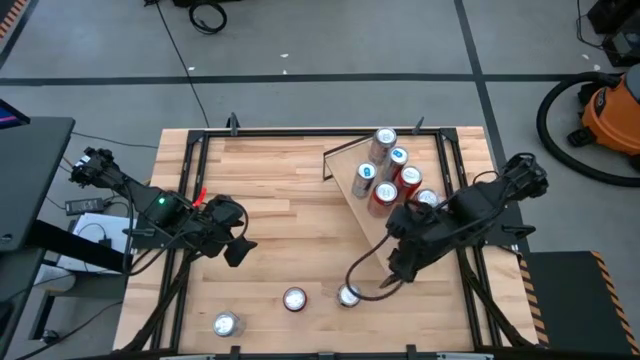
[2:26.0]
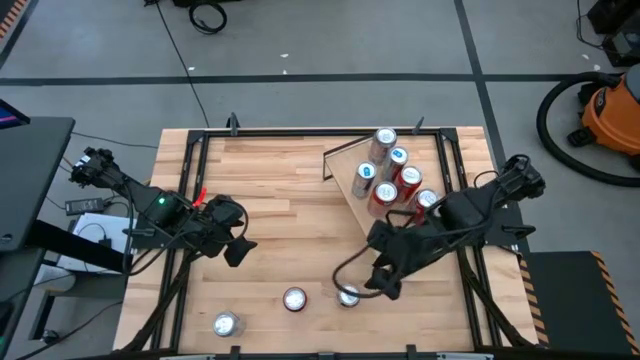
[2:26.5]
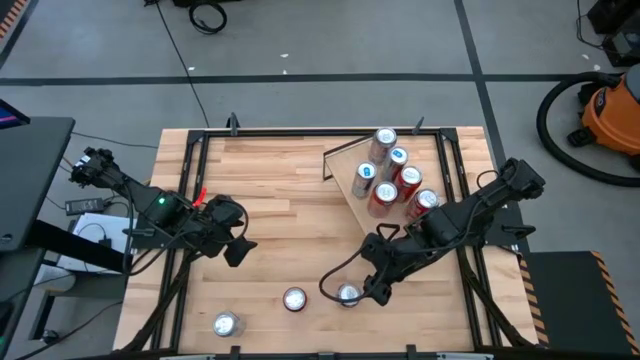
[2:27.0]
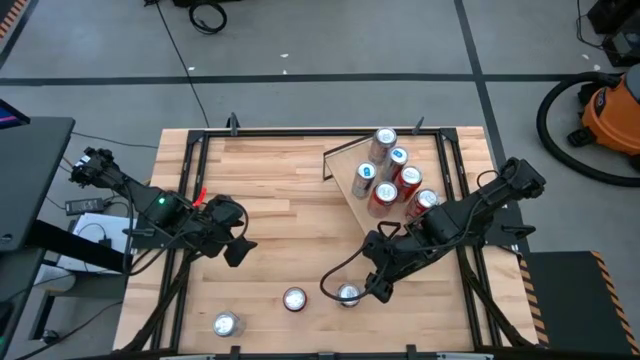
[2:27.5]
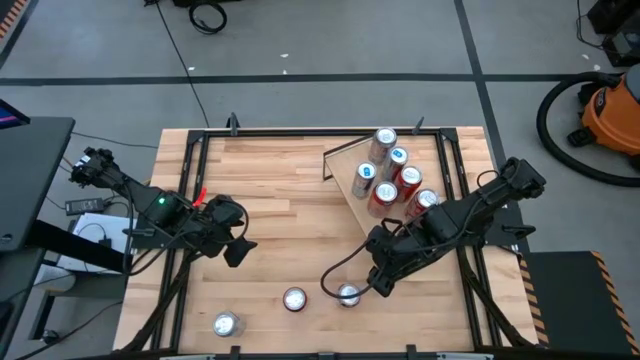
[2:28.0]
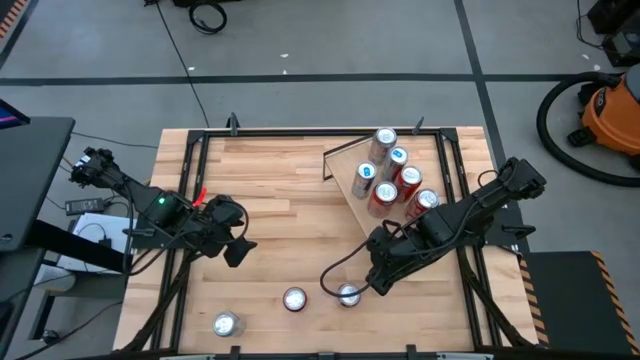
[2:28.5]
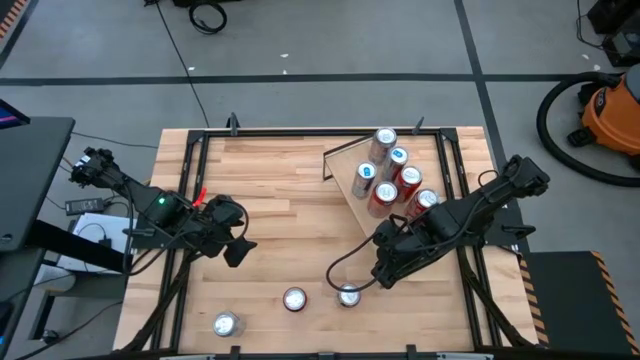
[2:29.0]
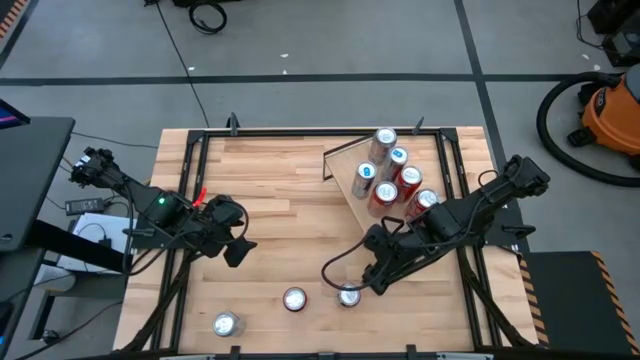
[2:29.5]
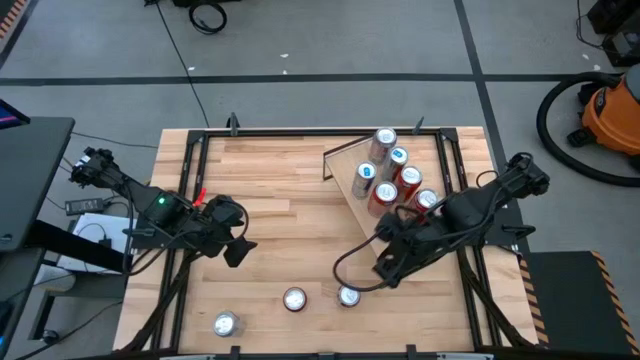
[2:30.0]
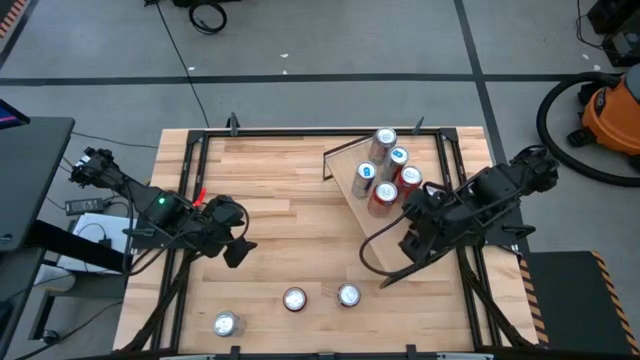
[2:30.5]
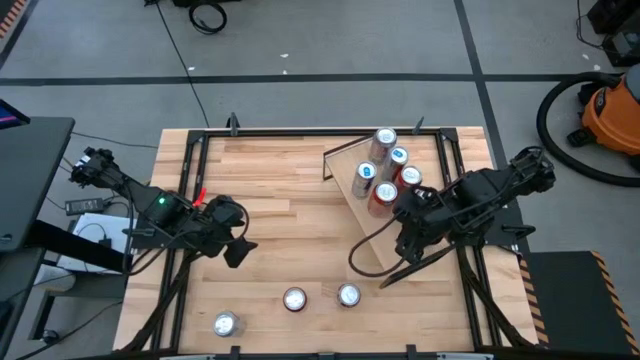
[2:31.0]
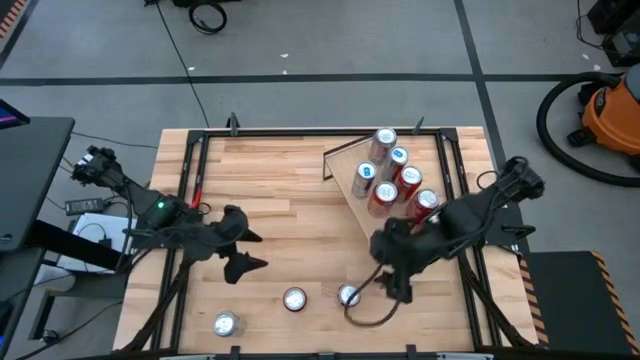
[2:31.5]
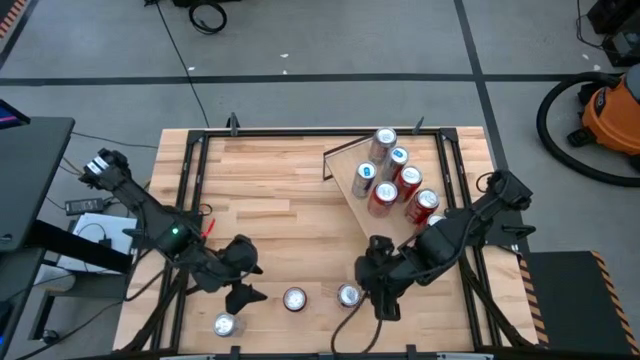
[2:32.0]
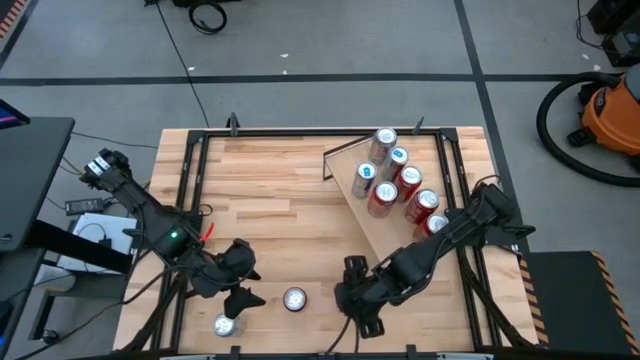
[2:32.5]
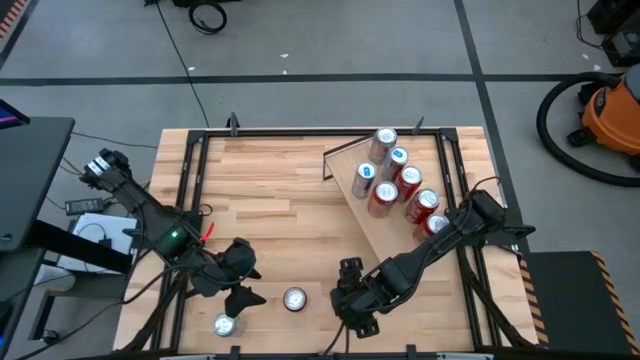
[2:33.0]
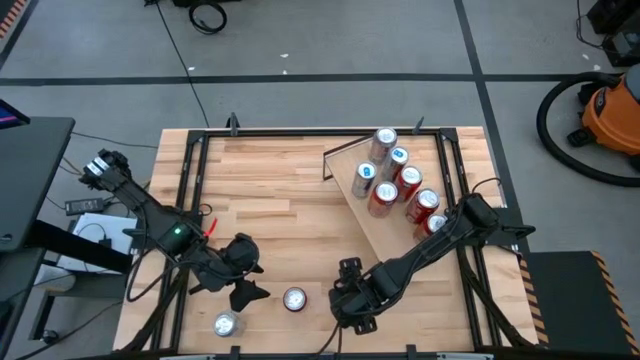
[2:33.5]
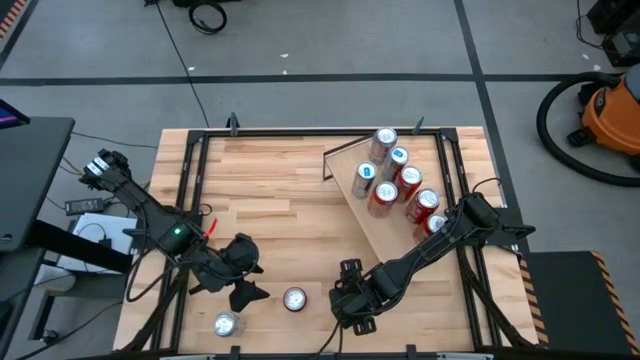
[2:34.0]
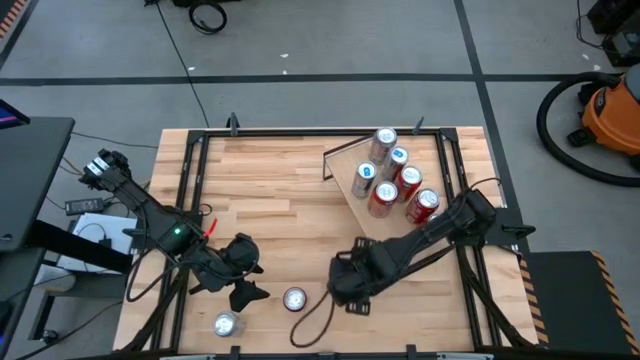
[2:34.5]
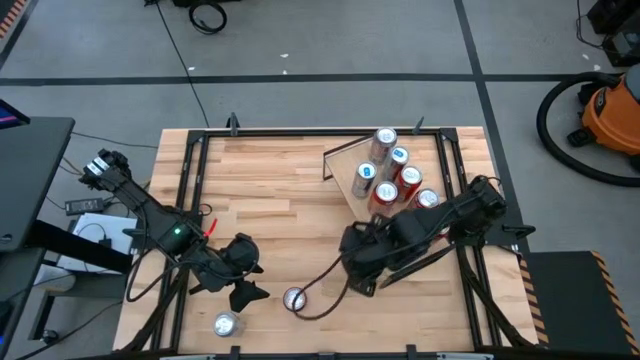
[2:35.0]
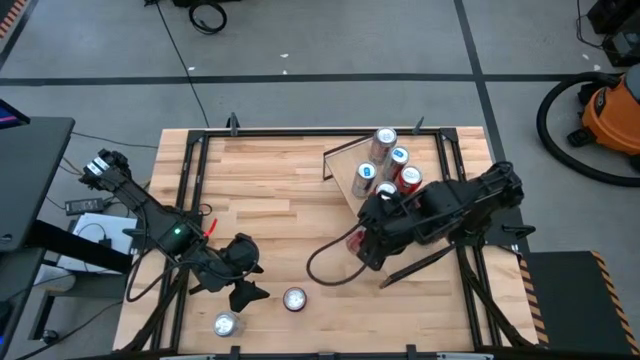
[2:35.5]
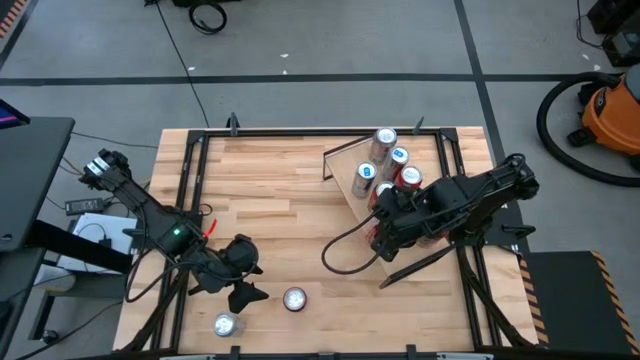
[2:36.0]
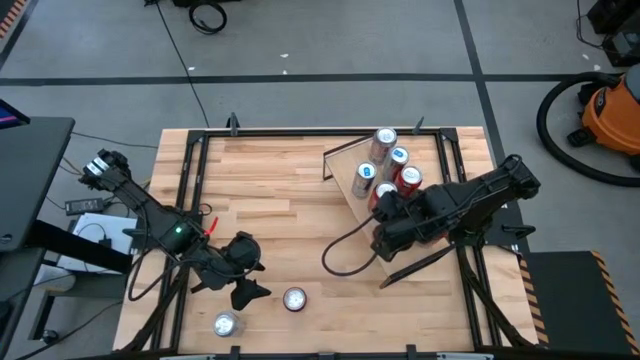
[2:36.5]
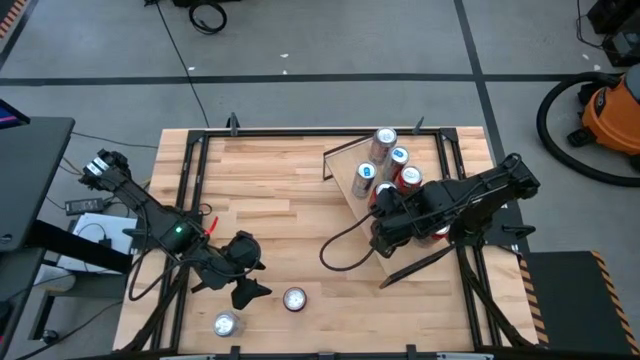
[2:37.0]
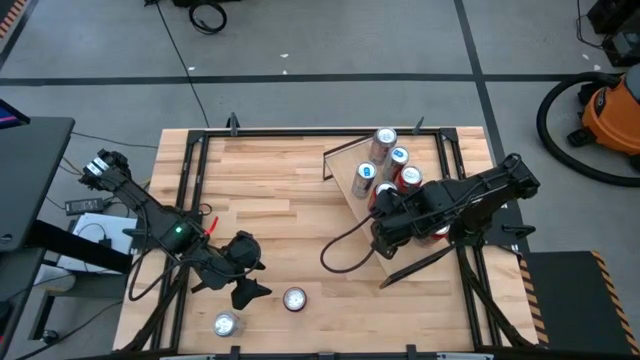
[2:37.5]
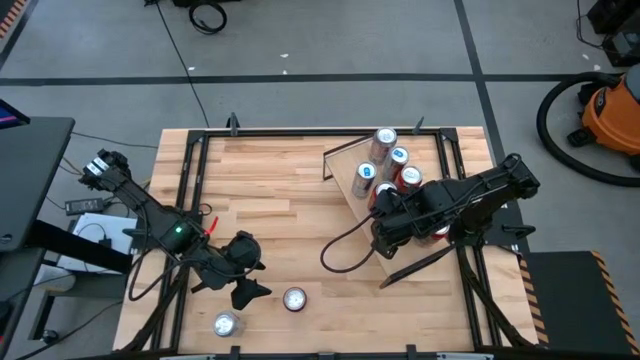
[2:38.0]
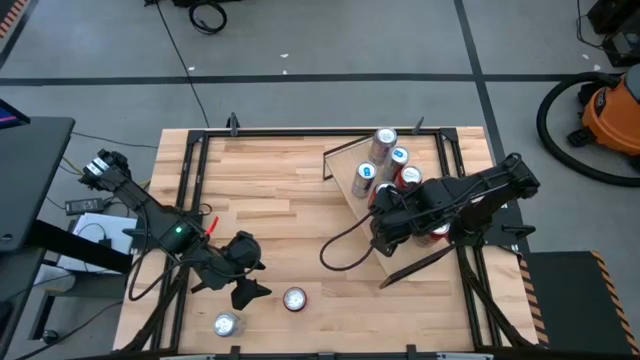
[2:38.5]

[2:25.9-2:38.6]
Task: Place canned beverage on shelf
Put the right red soda can on the shelf aligned with the other red soda can

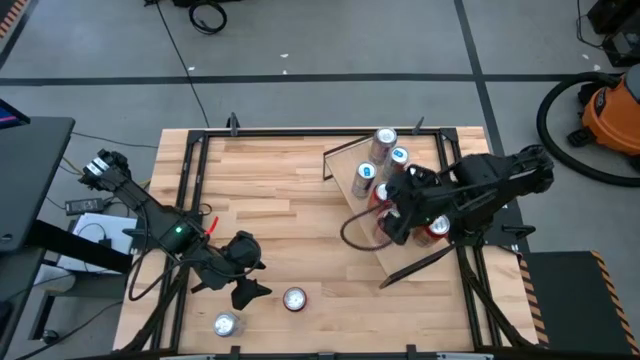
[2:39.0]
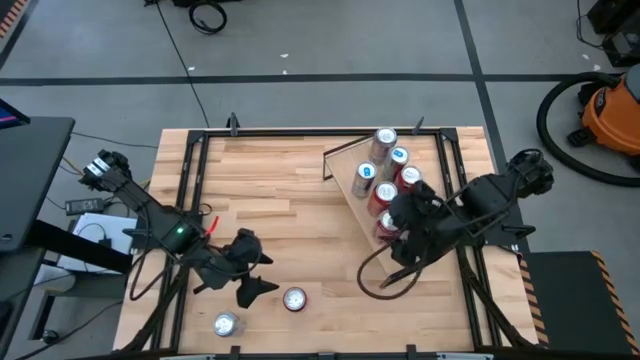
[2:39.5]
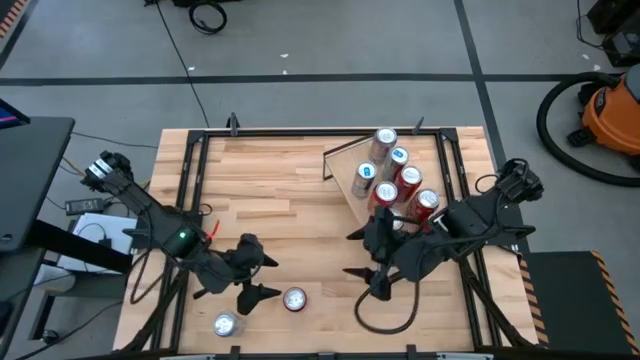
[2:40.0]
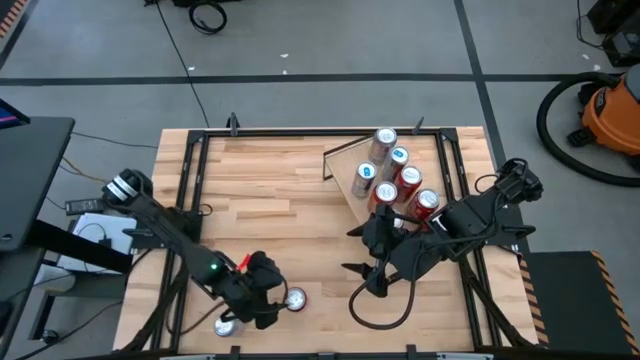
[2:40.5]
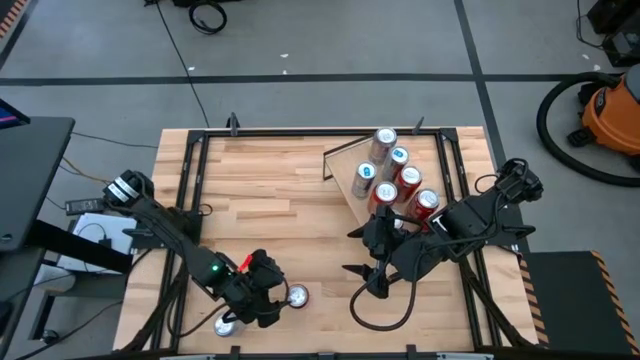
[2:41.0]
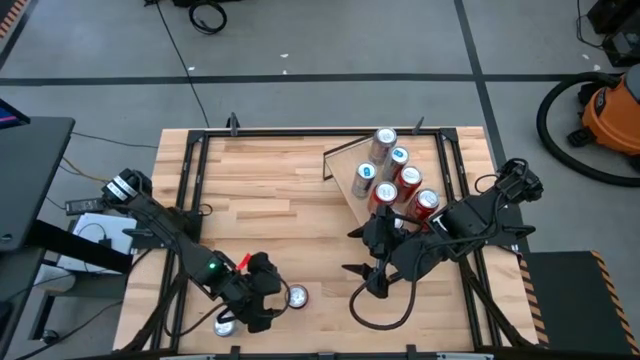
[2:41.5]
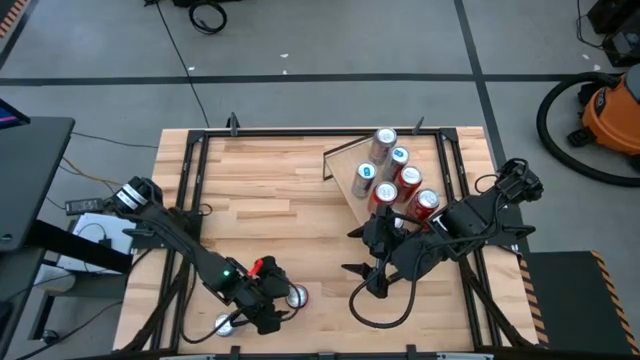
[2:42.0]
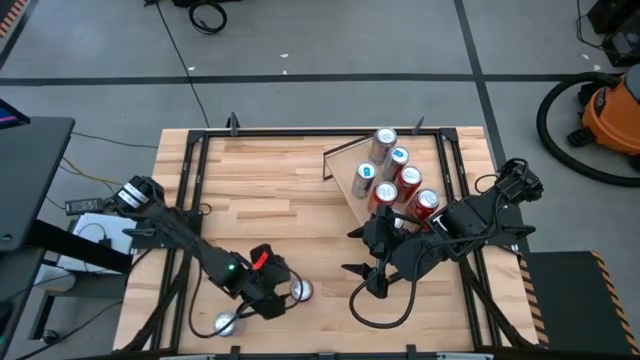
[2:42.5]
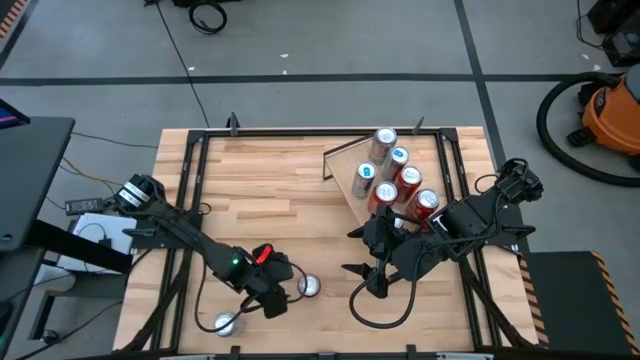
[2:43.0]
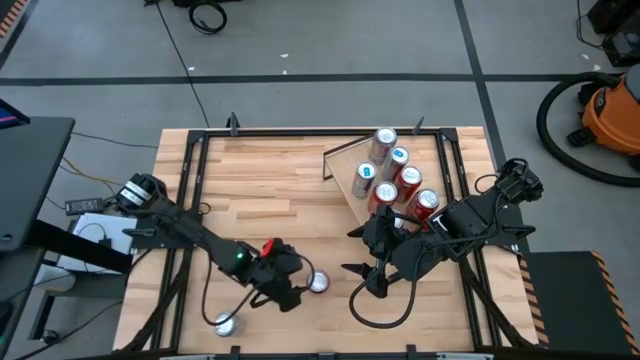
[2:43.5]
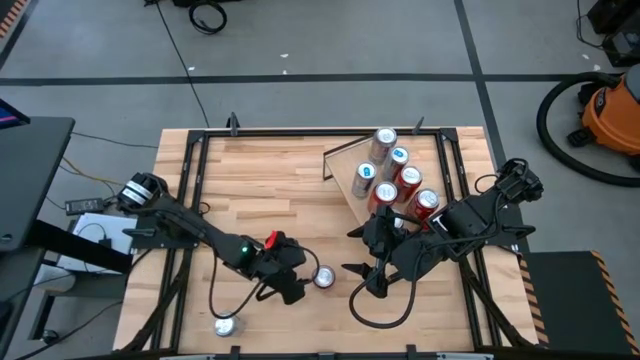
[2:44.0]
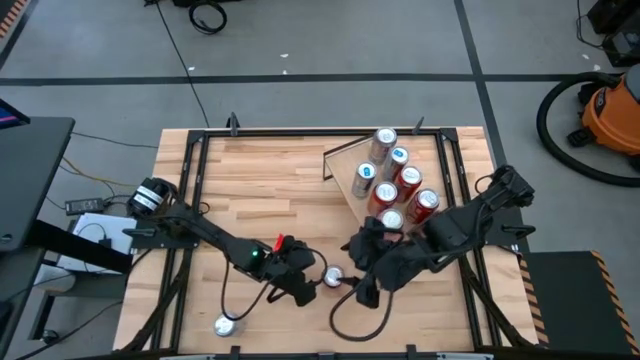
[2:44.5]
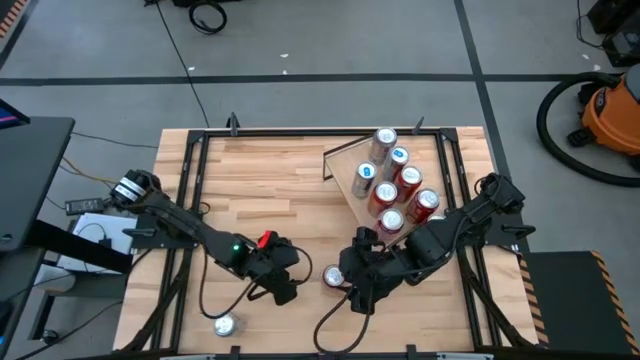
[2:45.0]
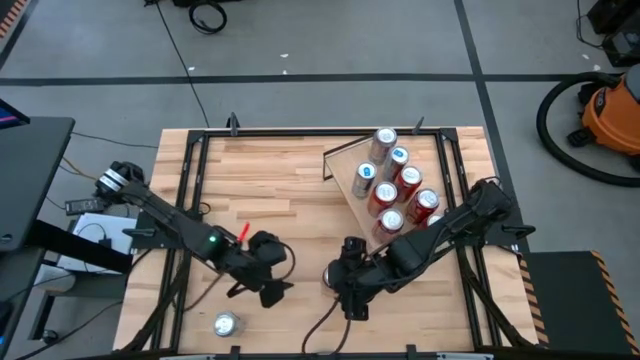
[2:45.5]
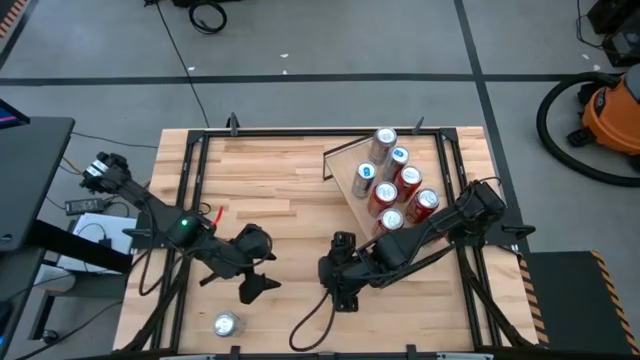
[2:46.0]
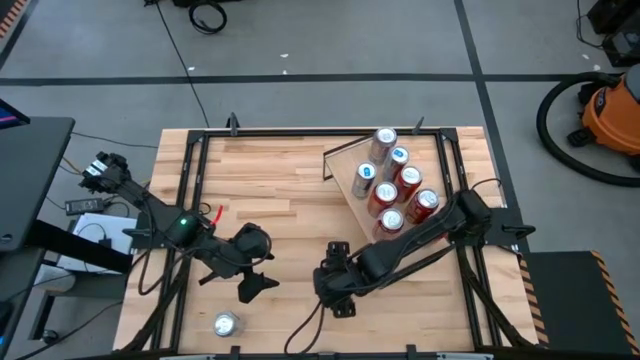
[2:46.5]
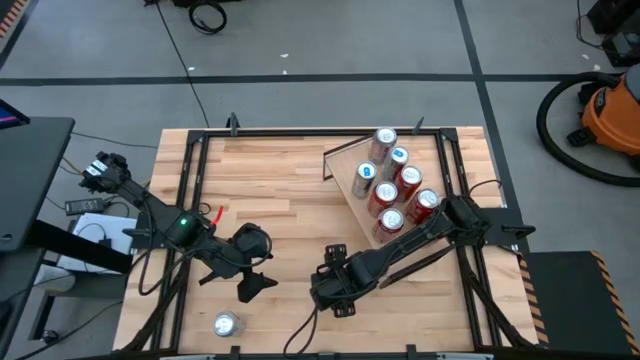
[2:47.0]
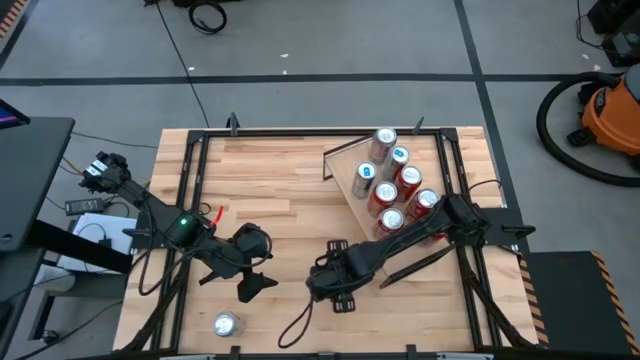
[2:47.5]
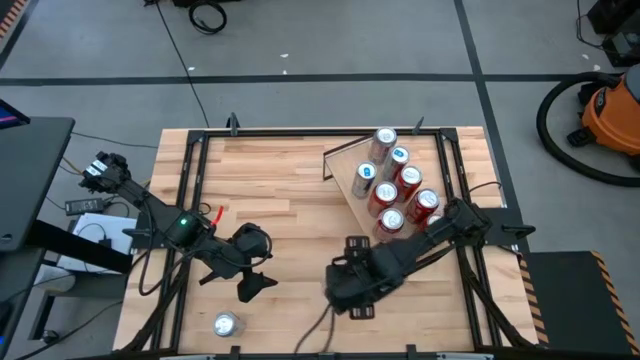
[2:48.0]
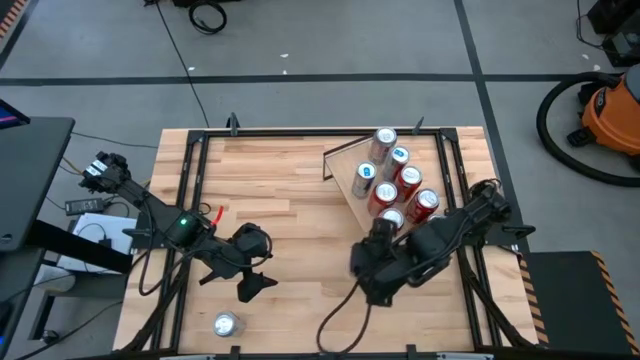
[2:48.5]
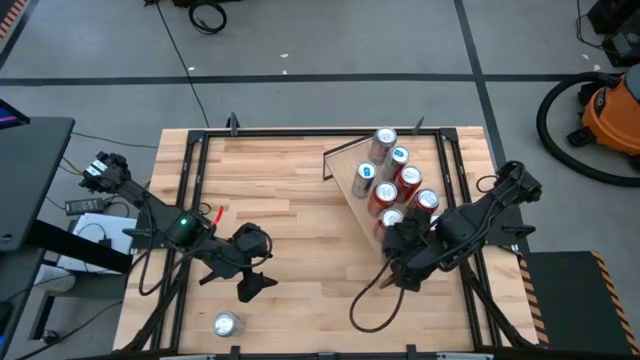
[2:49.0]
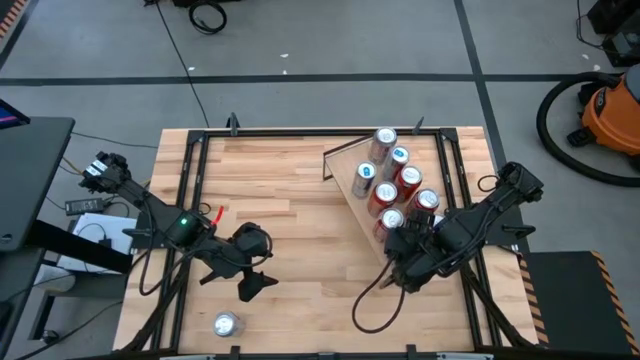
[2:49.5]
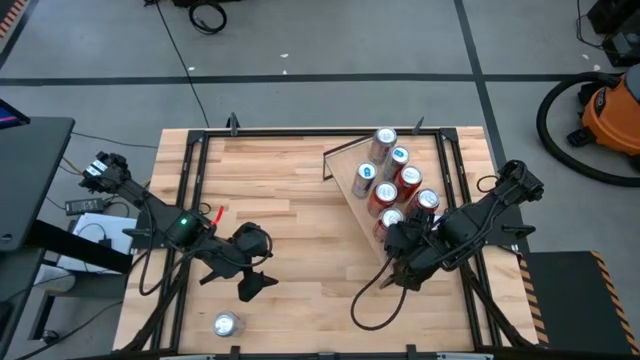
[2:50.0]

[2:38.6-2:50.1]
Put the red soda can on the shelf aligned with the other red soda can
